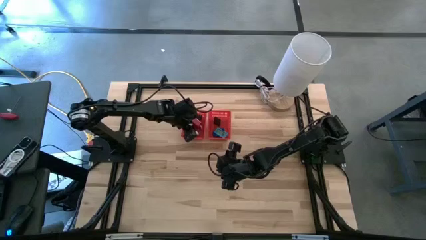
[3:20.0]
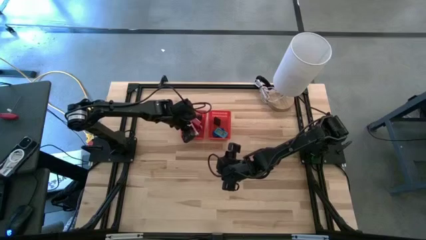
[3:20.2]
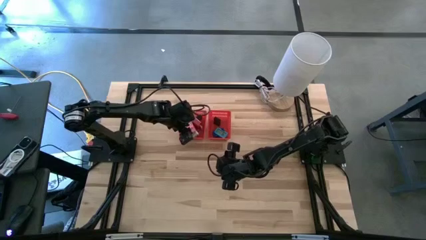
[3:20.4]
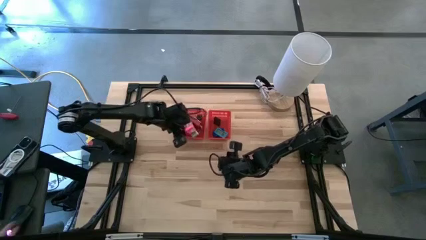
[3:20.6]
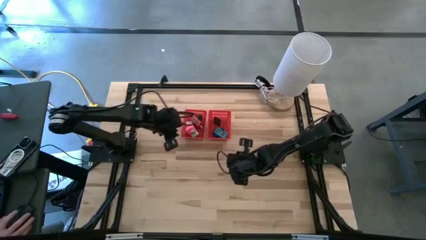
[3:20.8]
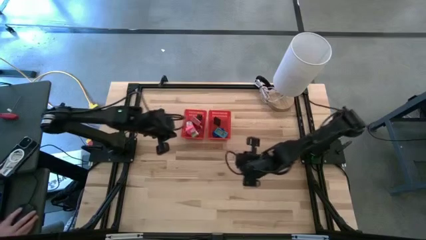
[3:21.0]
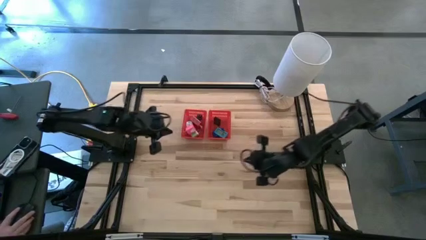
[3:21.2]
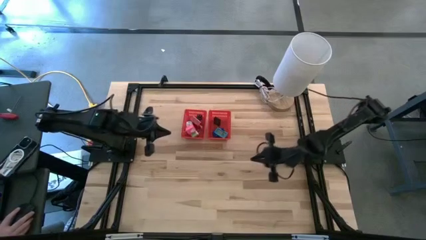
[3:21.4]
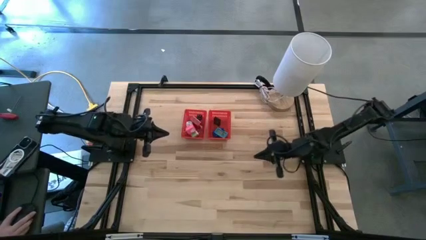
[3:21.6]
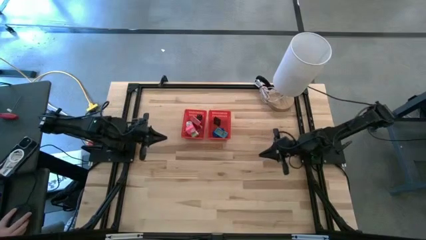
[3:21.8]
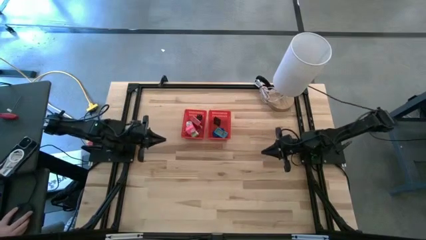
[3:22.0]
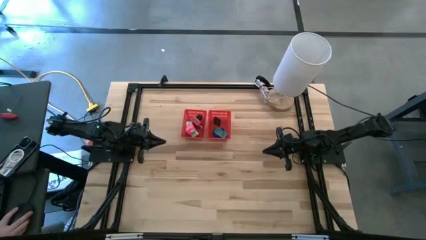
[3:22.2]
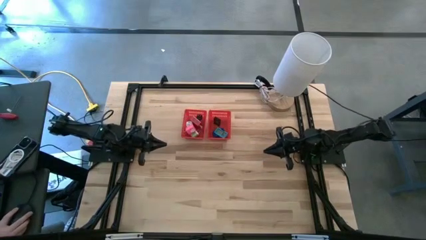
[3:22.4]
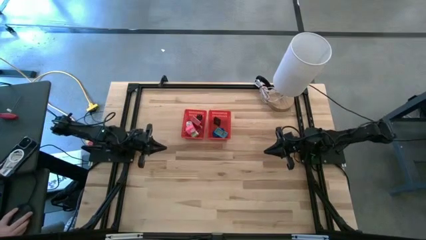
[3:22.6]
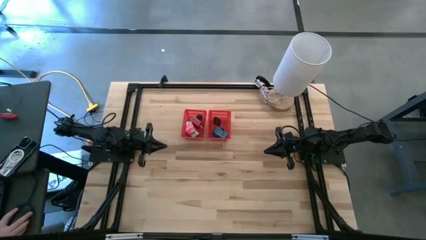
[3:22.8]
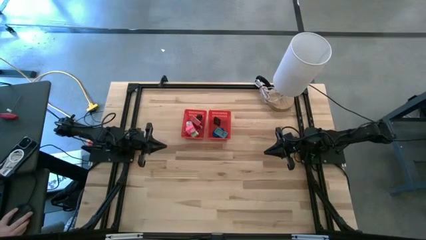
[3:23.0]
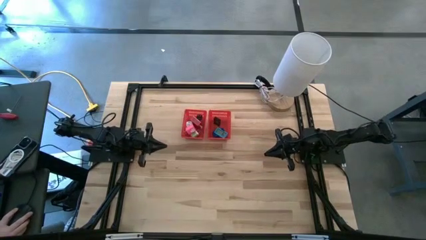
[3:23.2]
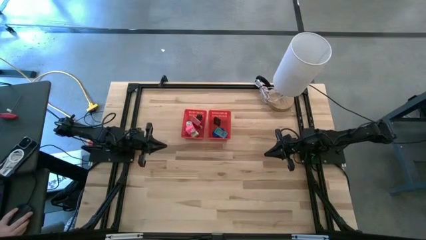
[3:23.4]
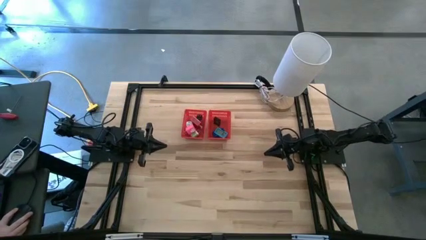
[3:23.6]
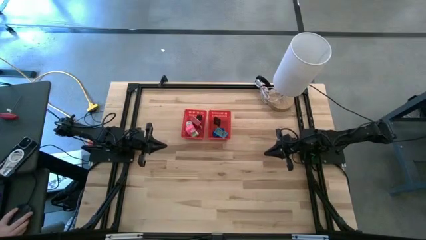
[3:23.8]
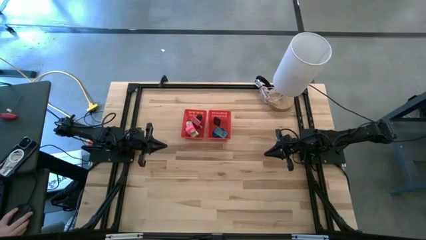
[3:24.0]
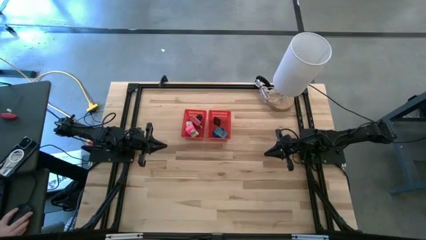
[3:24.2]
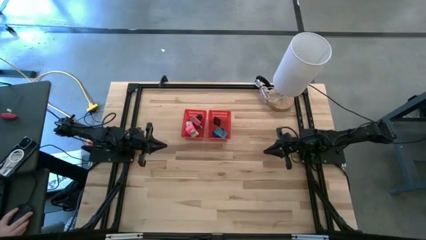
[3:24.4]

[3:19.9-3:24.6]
Task: Pick & Place Office items
Return to Home Position

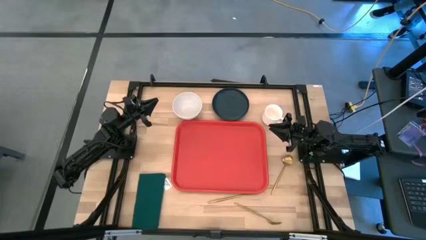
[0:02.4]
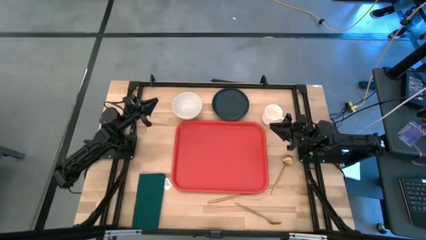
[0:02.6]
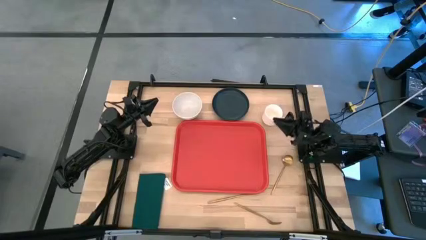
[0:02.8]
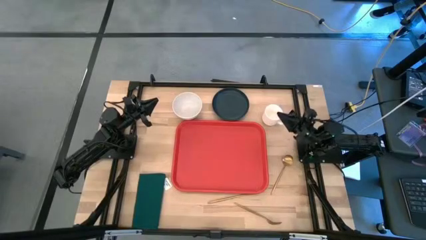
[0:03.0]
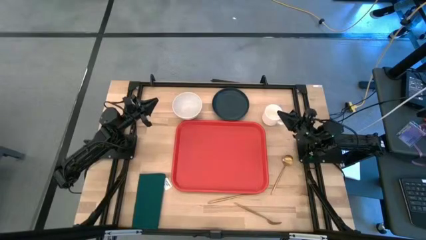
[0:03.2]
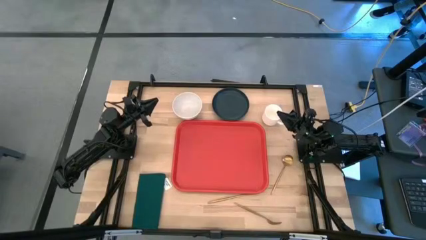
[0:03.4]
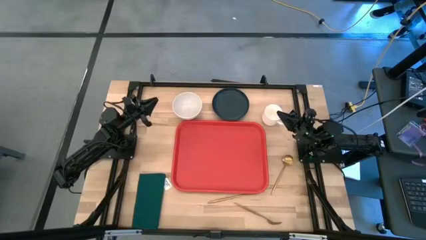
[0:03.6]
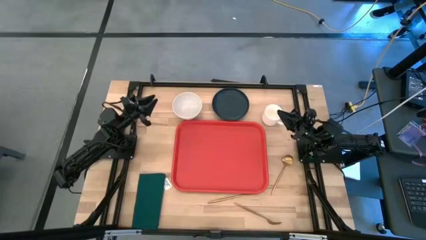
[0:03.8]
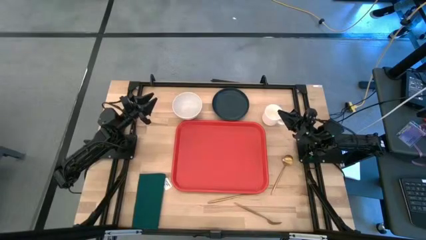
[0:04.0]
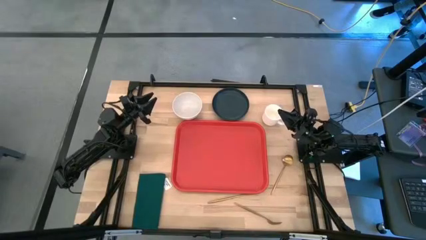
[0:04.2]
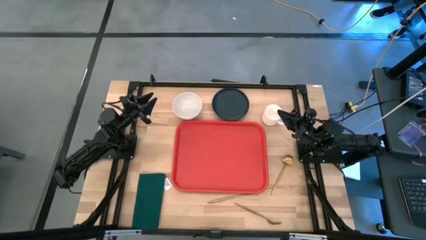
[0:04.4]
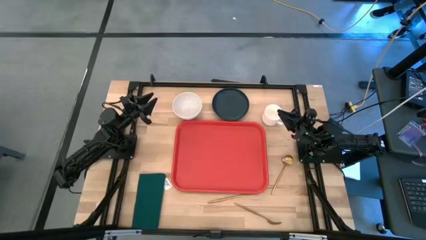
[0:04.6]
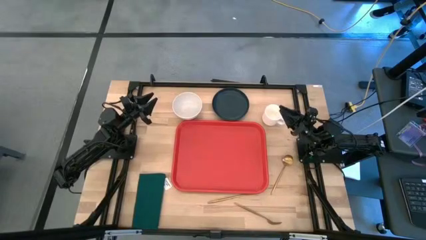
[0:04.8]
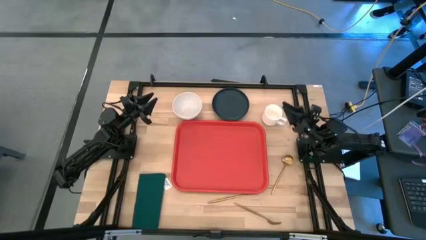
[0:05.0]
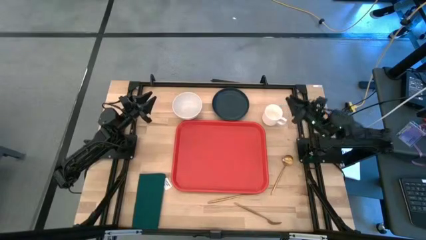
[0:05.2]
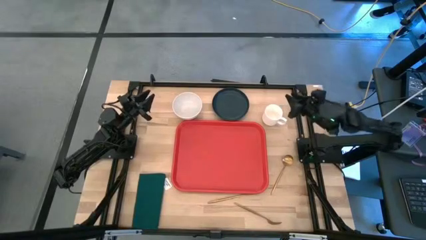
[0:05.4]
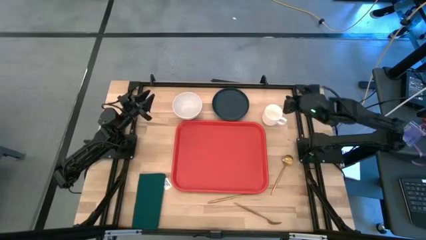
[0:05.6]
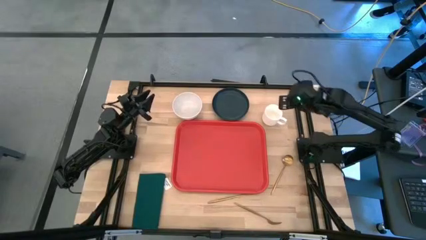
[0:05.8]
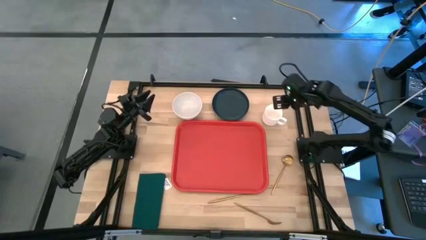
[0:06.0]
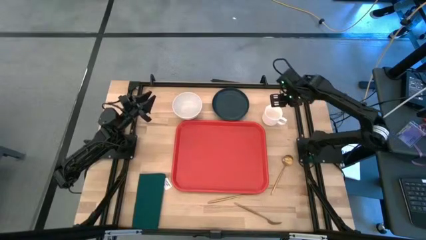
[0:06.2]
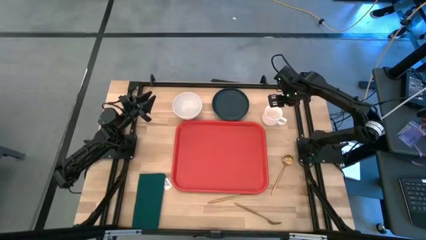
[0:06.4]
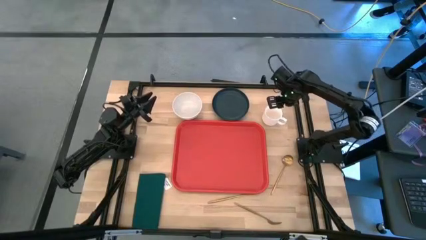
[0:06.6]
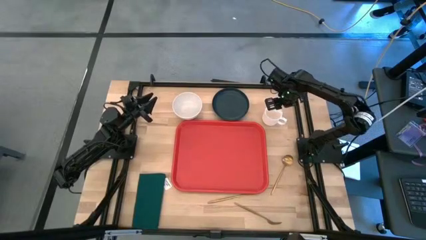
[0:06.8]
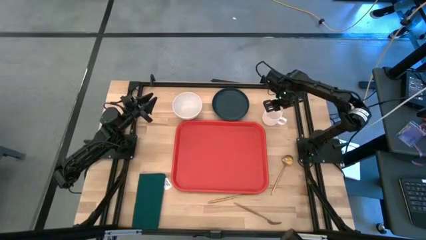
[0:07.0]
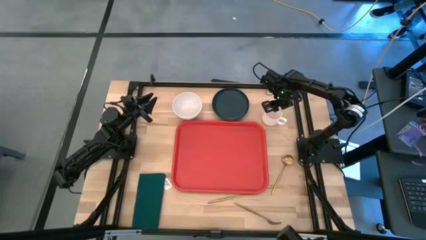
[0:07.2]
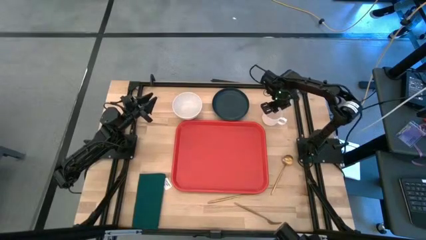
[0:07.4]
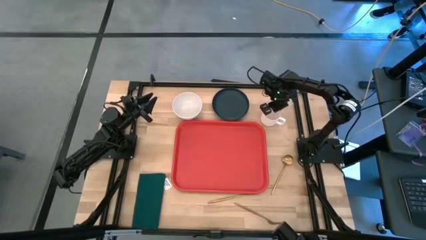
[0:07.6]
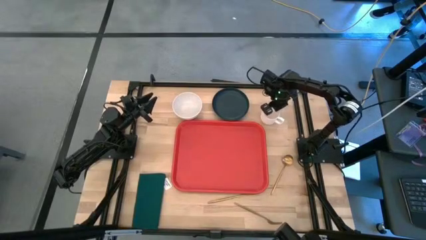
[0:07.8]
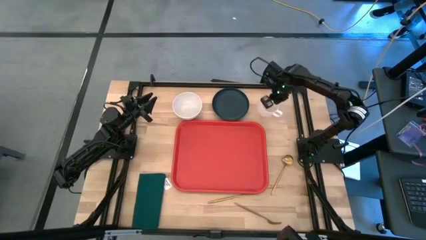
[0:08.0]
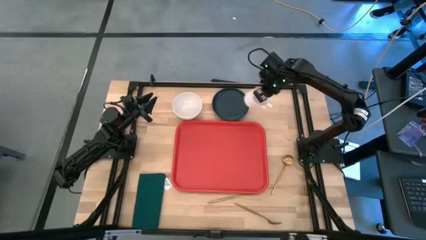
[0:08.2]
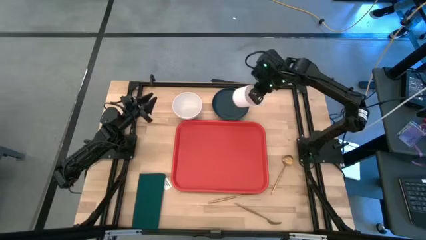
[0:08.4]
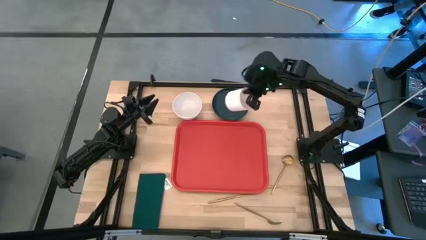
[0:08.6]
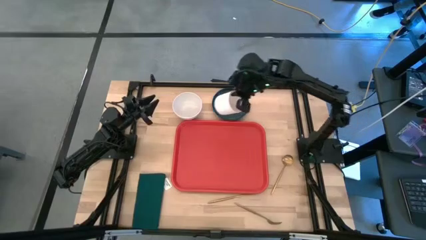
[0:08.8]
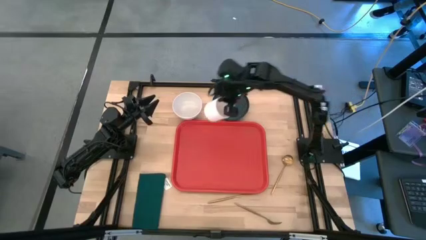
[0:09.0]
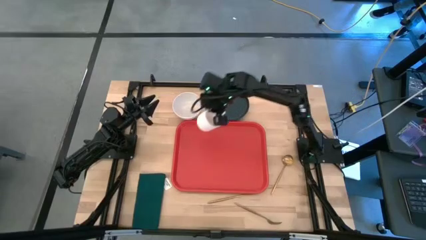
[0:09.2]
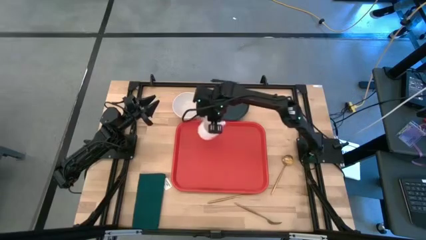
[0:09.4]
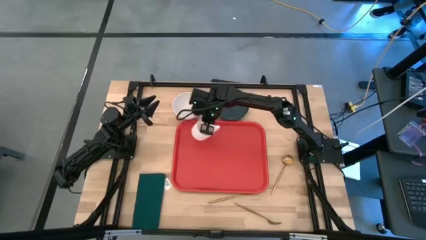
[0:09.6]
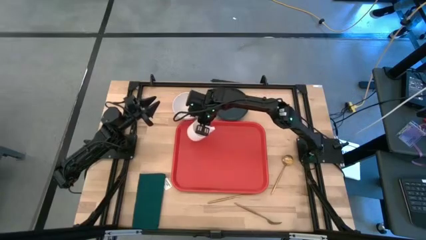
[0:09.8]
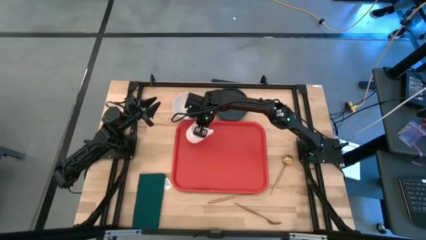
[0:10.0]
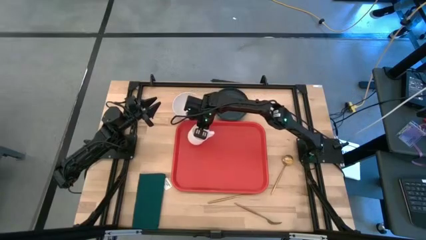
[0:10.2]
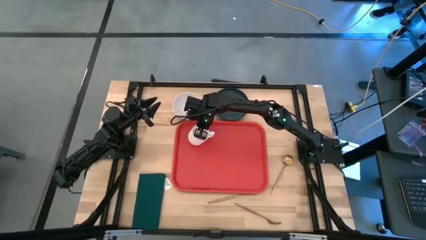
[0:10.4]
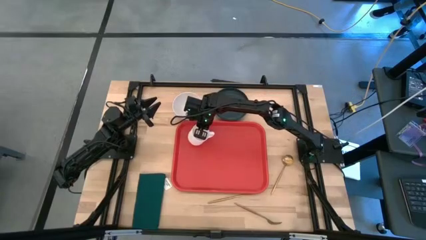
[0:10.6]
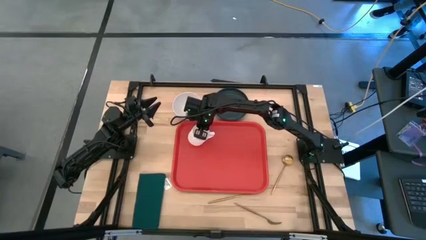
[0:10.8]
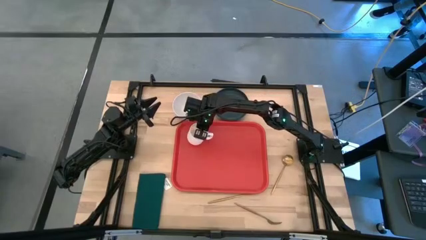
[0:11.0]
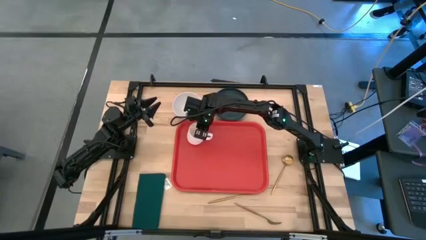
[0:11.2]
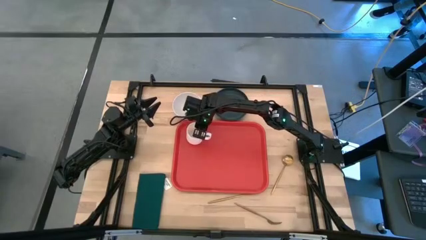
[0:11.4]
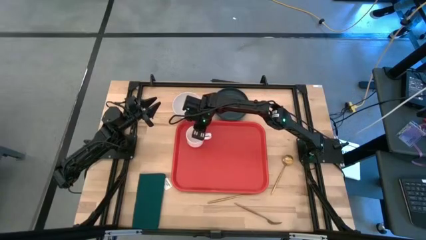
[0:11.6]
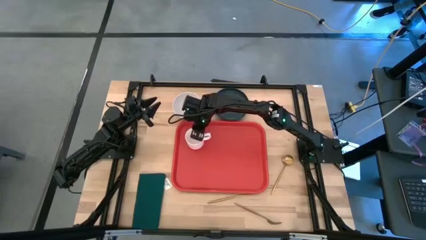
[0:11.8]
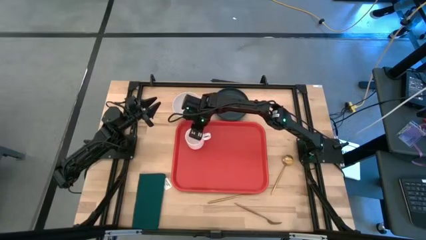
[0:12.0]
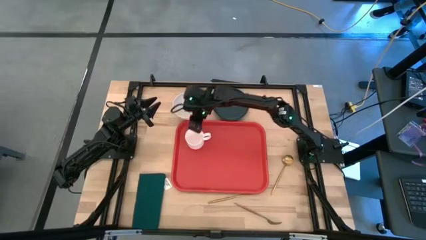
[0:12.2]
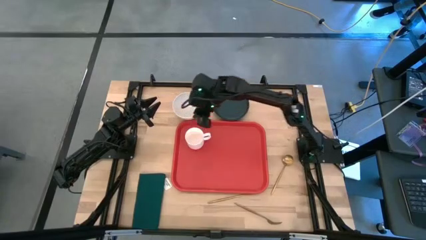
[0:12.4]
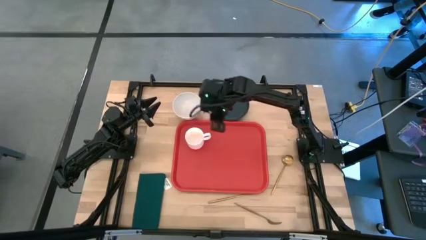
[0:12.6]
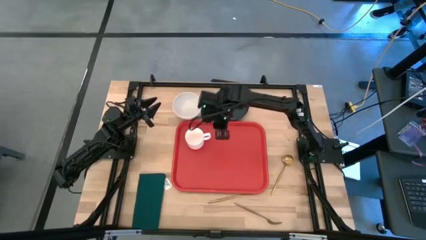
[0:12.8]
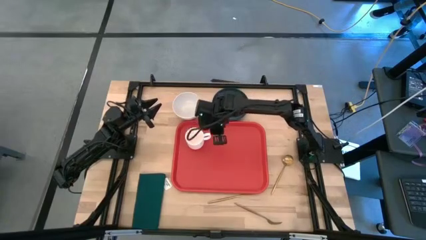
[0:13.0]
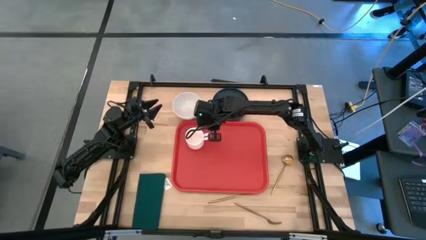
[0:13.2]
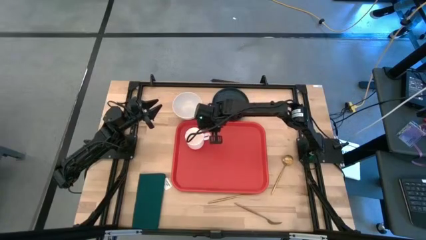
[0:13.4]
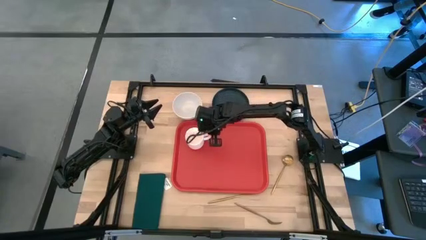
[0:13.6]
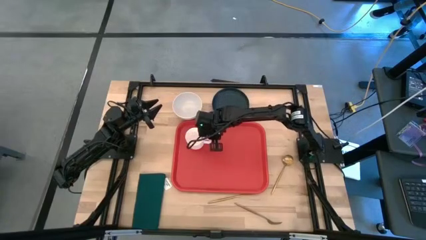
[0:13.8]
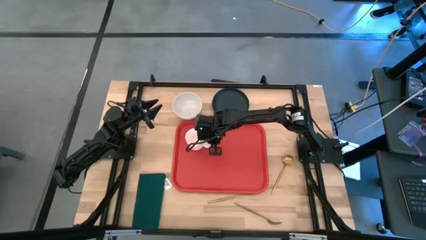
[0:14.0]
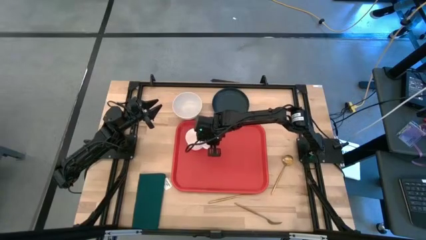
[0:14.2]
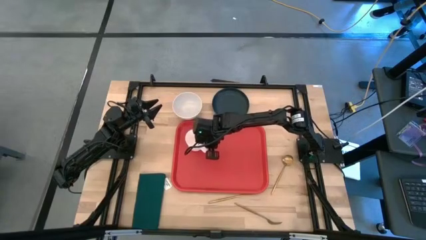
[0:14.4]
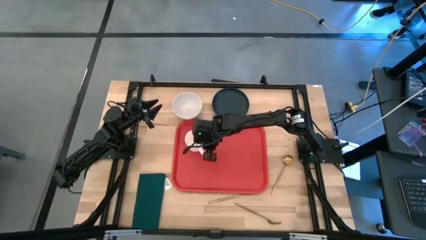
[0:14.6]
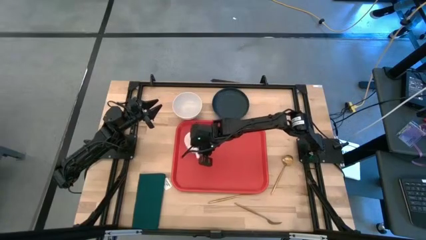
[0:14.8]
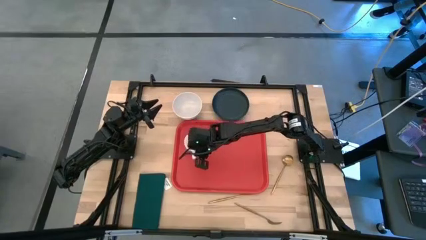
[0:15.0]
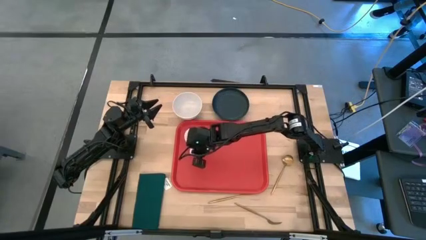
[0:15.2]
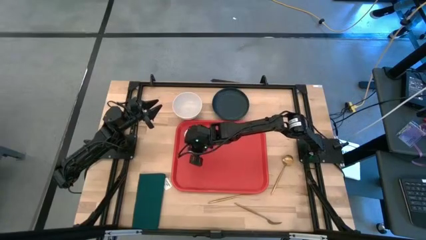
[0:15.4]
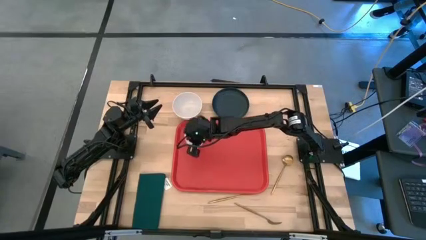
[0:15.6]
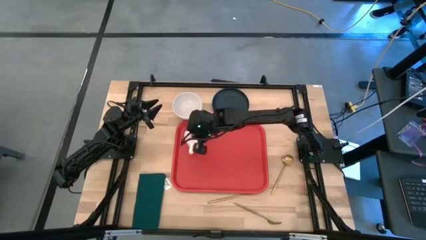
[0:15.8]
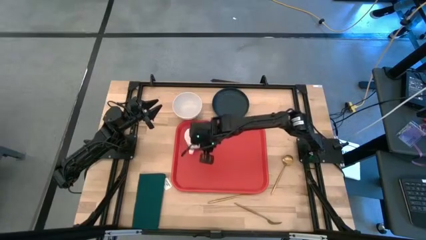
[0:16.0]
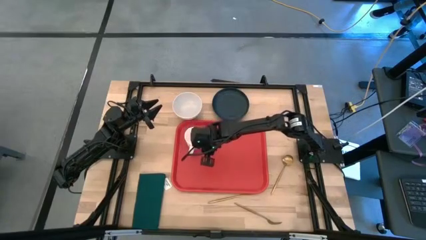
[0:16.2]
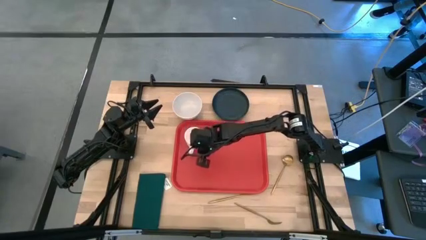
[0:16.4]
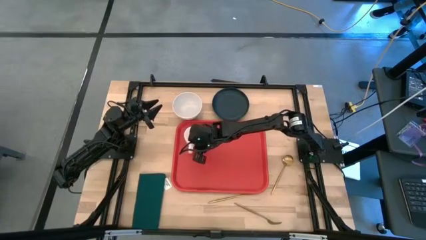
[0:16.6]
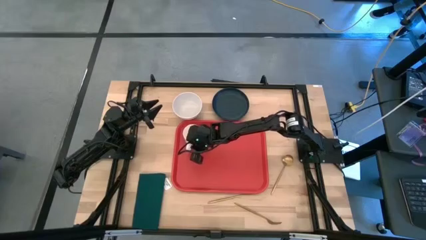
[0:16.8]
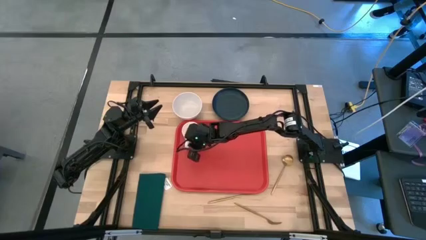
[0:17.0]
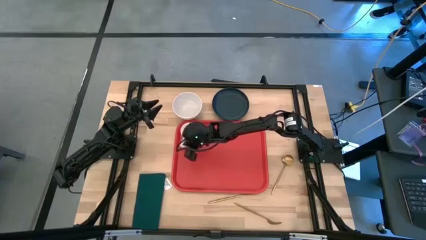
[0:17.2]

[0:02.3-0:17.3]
Task: Set up tray
Put the white mug on the red serving tray
